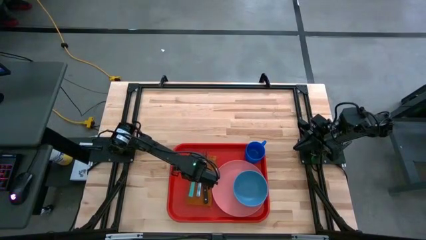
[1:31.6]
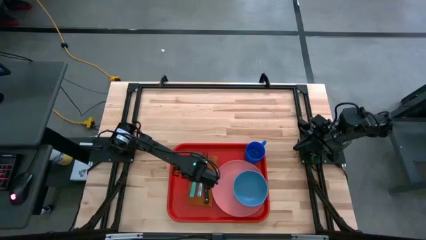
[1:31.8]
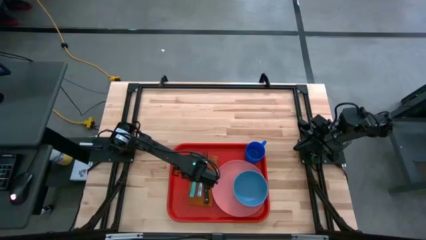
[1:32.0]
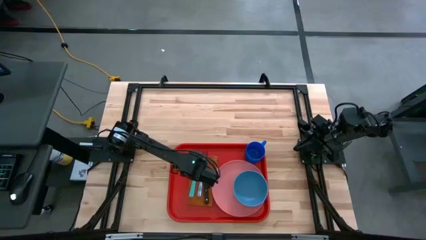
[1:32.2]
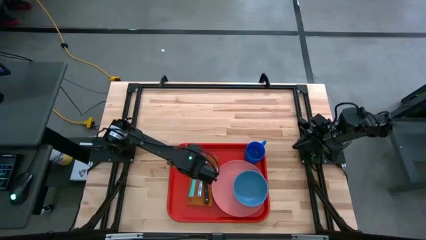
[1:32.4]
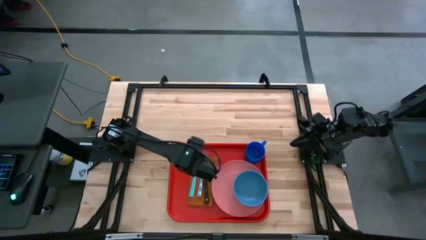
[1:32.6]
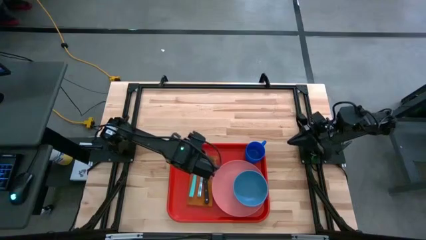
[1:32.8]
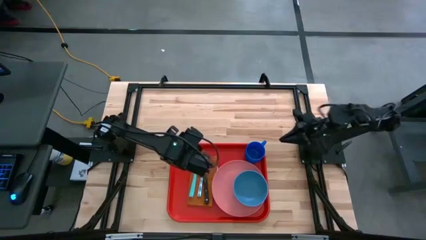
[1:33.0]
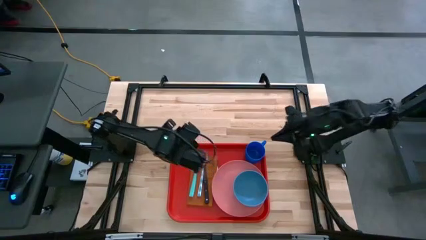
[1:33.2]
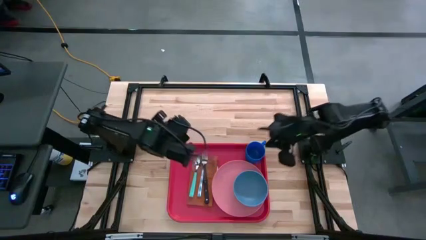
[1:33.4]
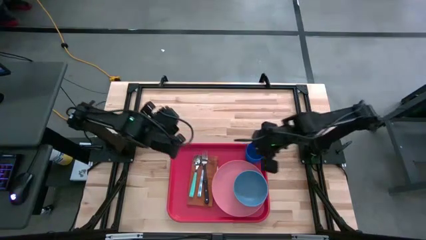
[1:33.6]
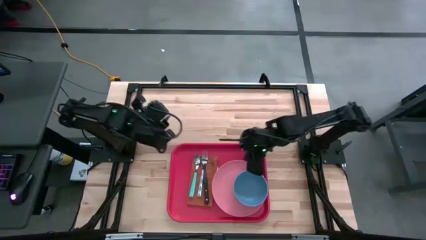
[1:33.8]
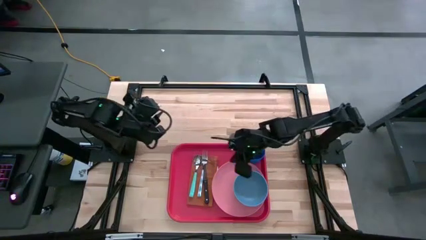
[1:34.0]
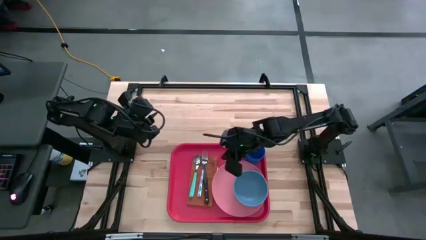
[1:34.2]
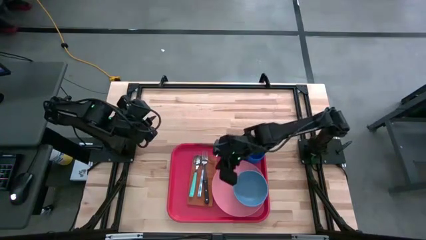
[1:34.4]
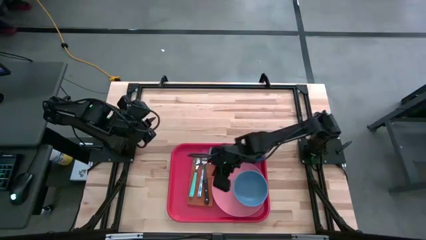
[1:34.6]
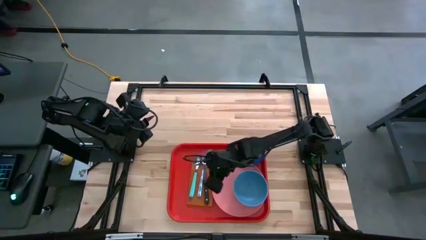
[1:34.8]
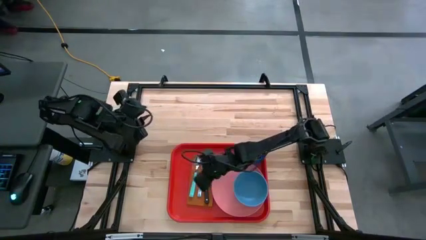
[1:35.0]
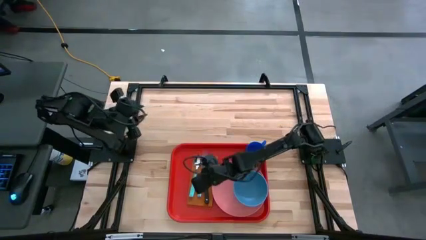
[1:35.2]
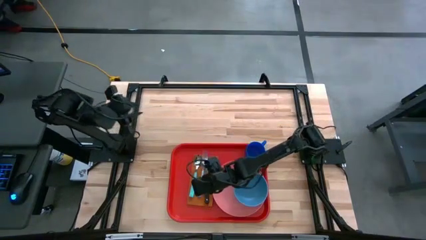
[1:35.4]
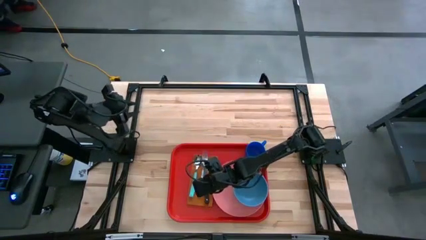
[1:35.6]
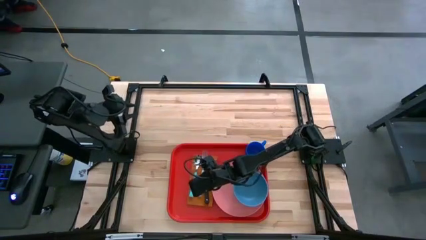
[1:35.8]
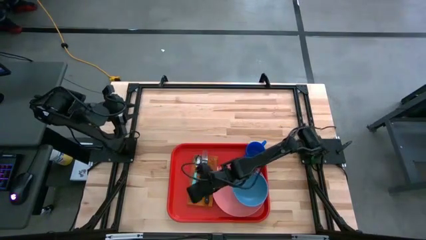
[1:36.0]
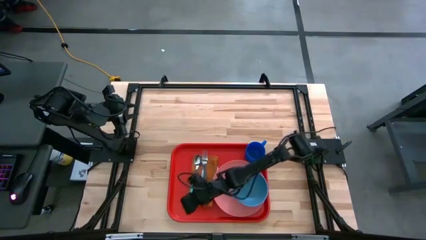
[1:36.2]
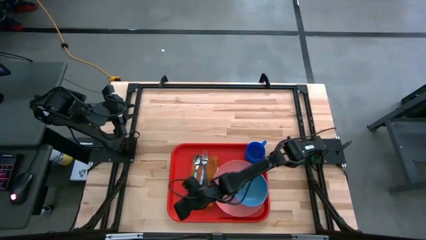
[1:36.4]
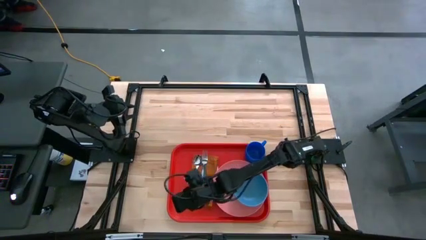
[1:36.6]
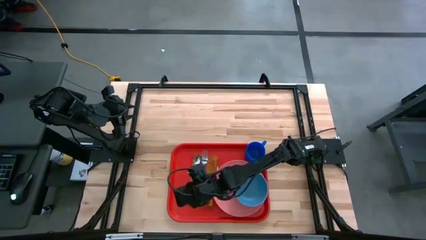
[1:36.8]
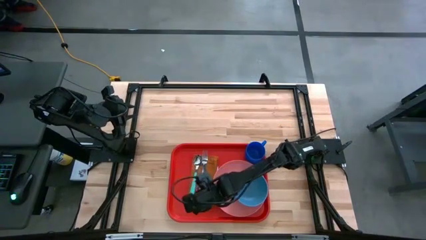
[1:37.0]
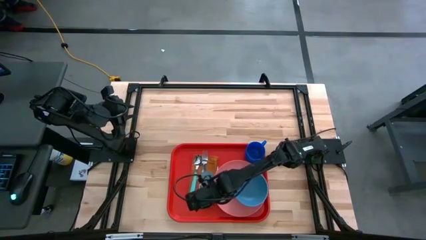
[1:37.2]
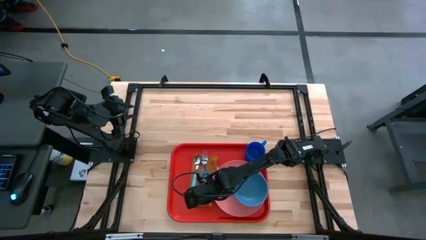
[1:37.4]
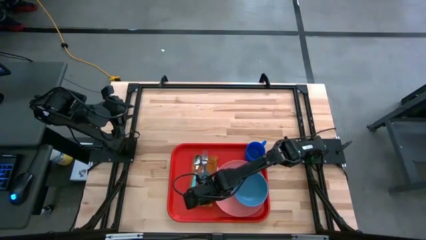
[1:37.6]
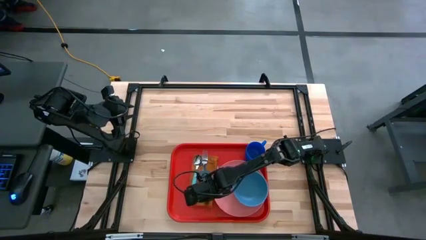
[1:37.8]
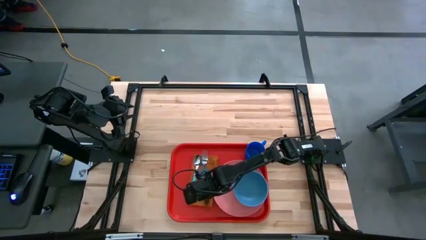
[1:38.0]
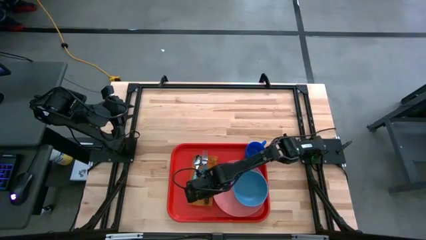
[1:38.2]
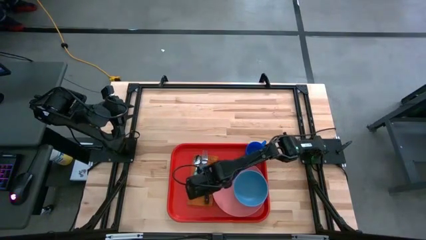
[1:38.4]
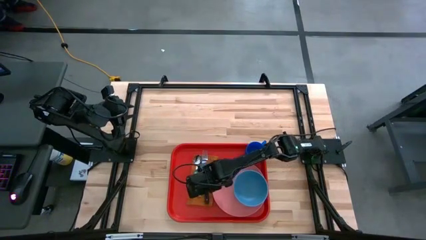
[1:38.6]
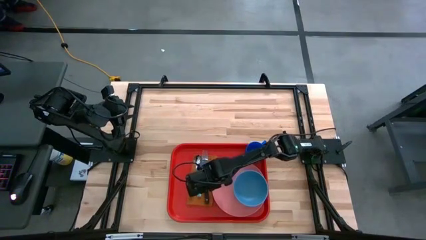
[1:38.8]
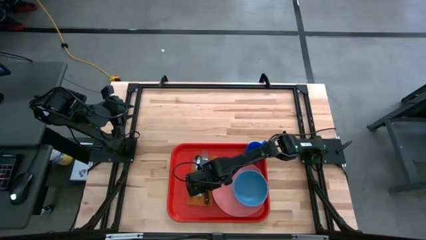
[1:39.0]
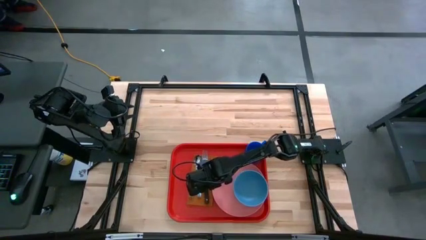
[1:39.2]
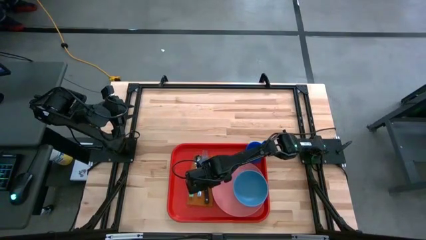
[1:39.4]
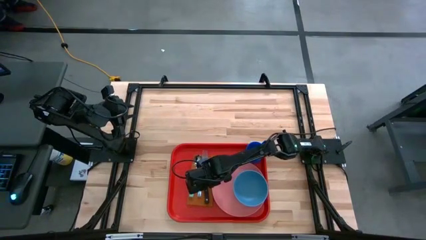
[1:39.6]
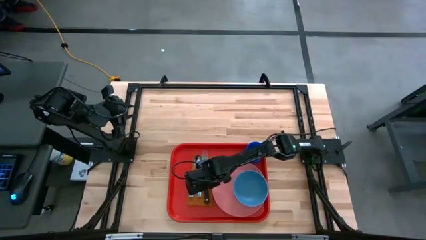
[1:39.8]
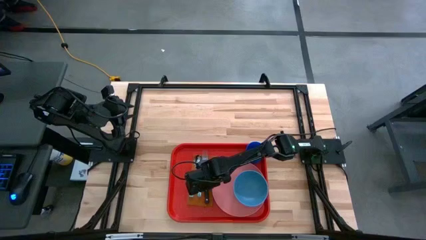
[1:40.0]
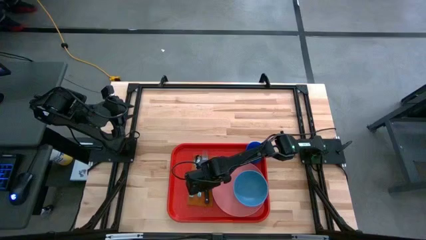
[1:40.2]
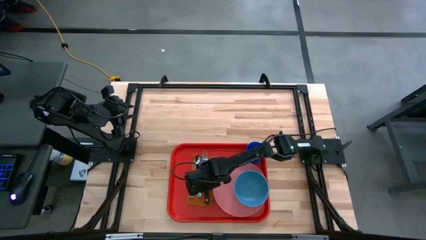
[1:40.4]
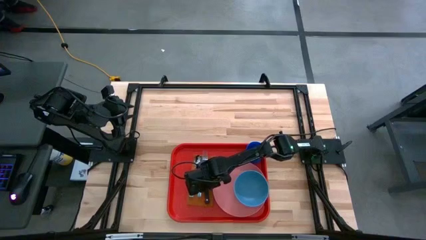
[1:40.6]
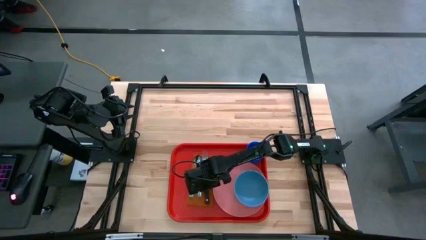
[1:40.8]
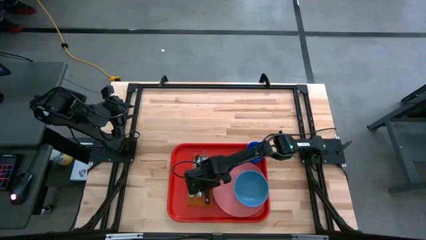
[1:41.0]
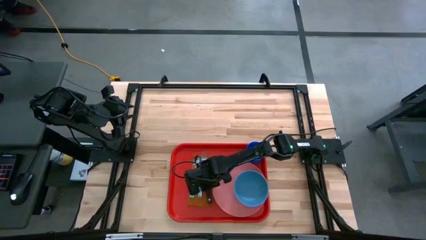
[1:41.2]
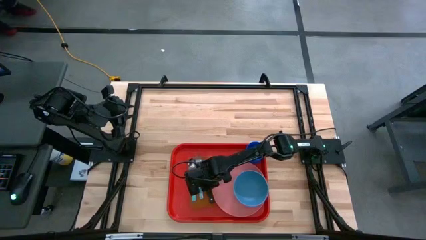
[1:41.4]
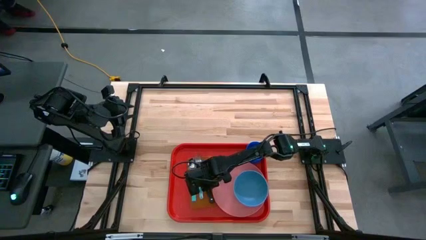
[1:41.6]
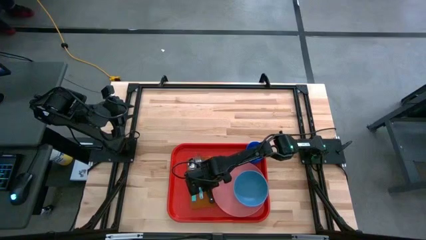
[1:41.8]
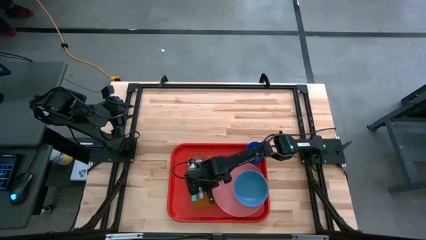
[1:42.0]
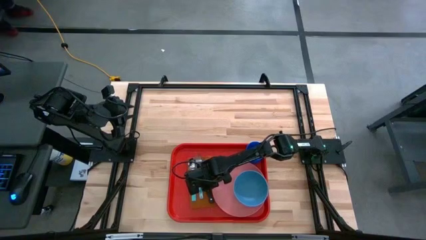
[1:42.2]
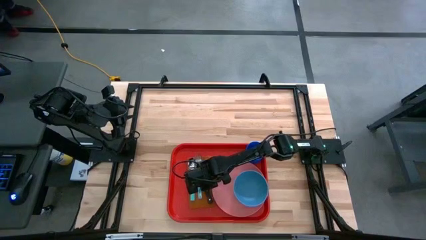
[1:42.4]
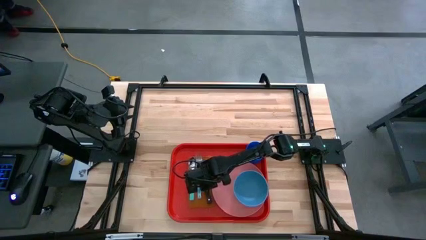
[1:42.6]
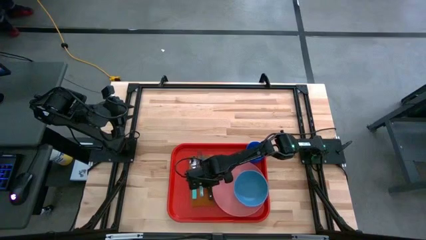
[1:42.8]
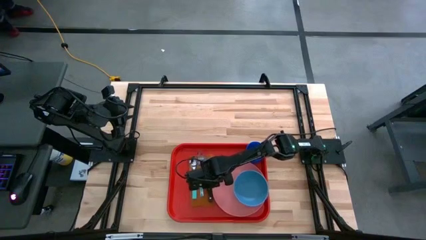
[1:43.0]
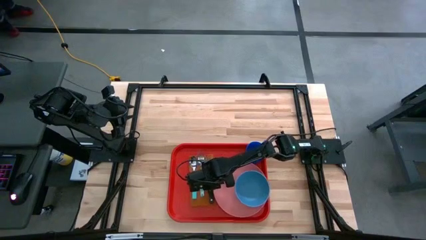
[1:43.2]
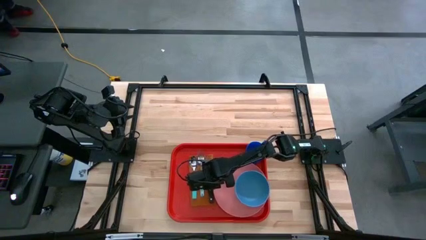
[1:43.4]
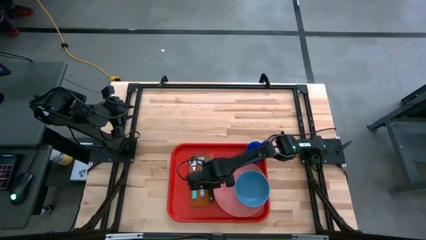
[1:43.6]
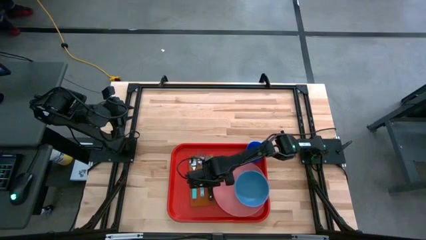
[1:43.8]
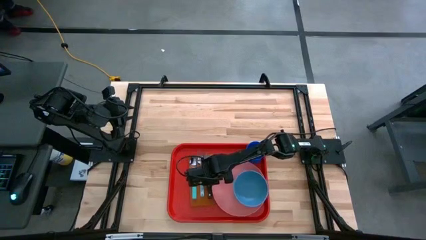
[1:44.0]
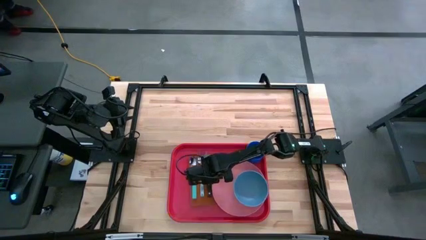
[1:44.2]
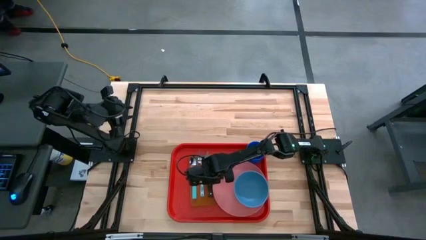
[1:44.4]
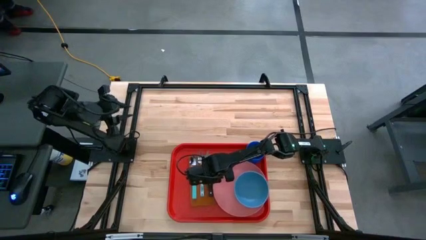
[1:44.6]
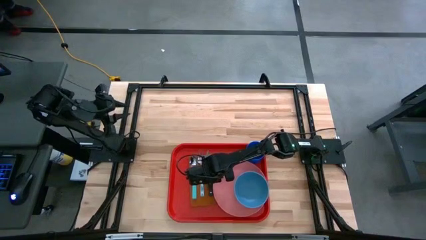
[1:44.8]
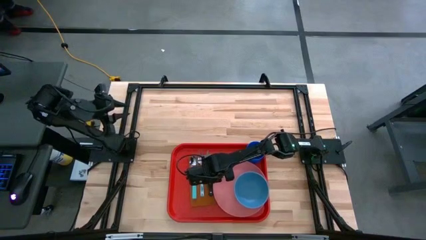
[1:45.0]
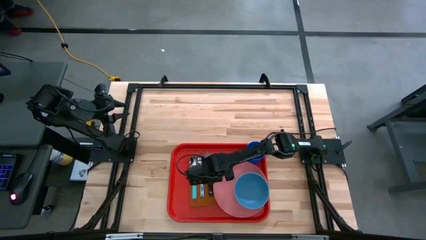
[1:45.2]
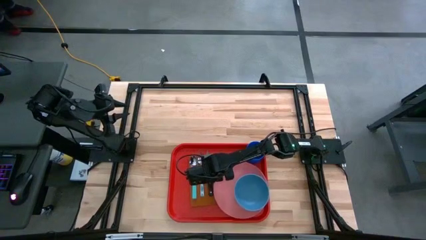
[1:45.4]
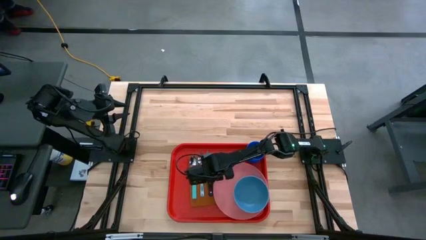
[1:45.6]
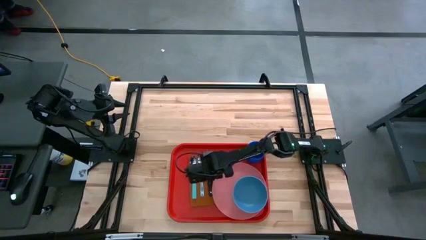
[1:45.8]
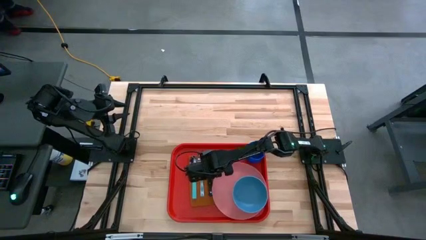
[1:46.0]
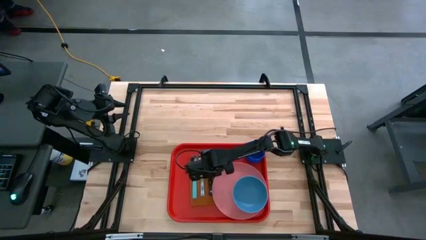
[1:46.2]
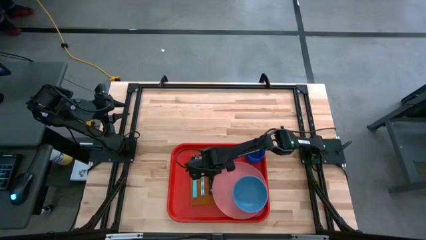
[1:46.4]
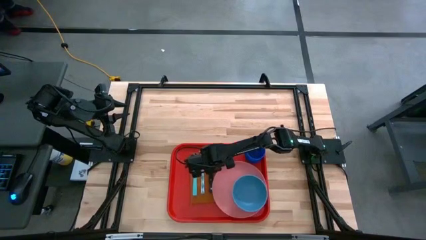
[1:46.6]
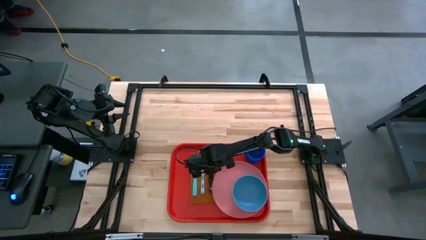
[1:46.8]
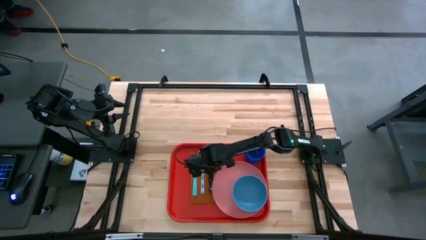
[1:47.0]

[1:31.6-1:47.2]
Task: Set up tray
Adjust the black bread knife
